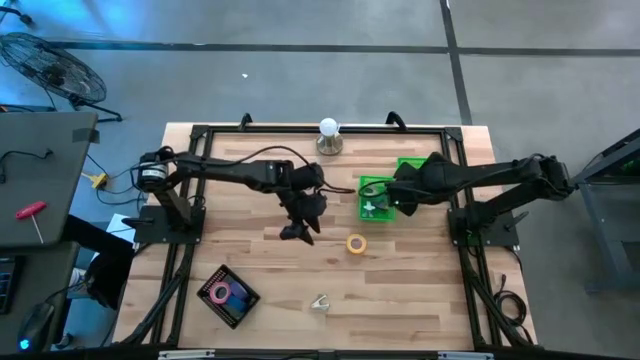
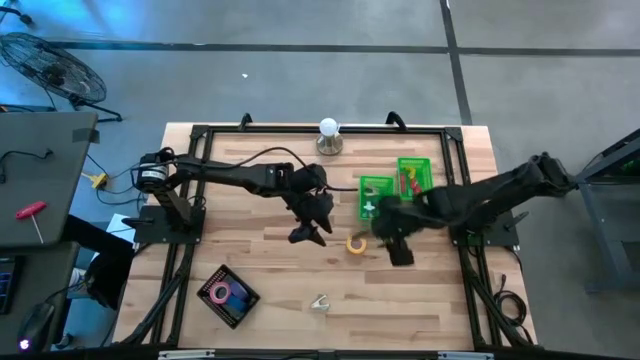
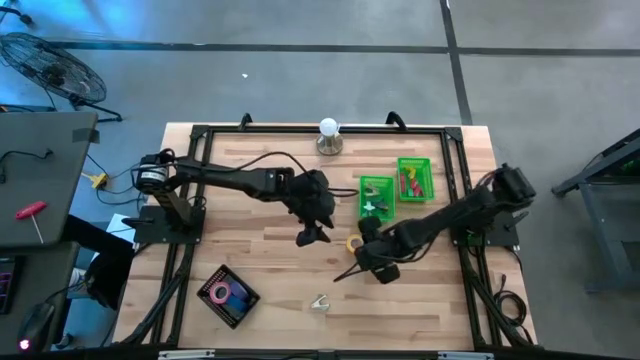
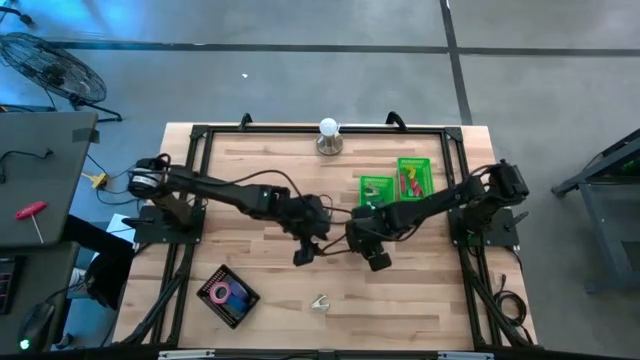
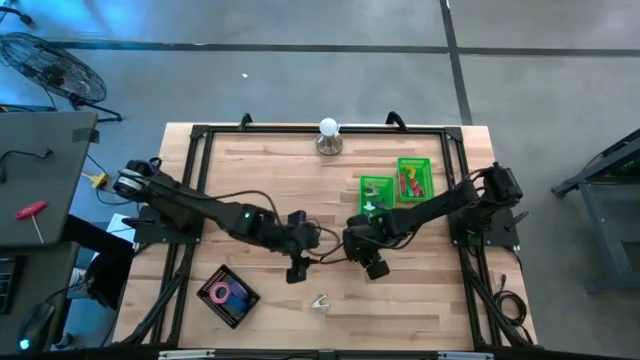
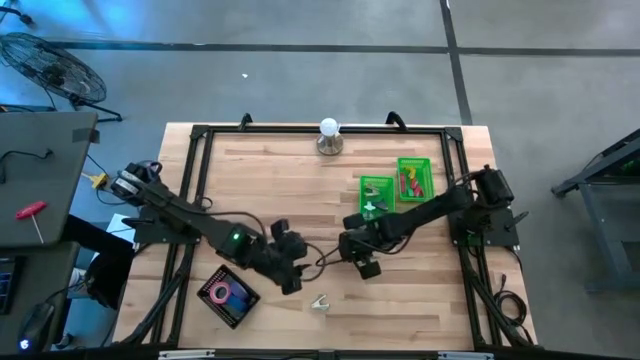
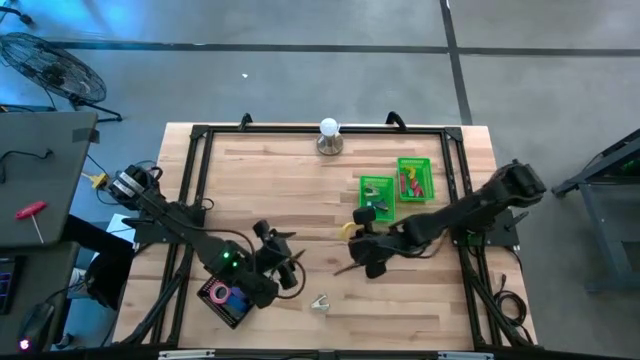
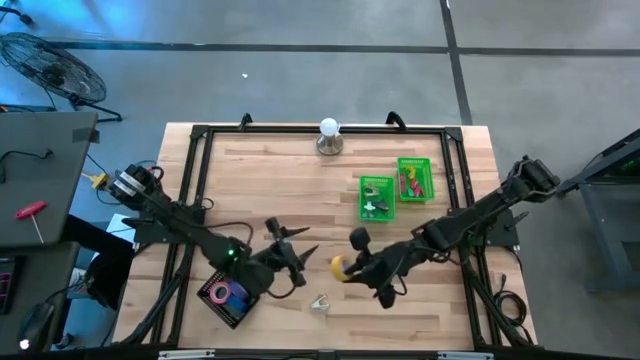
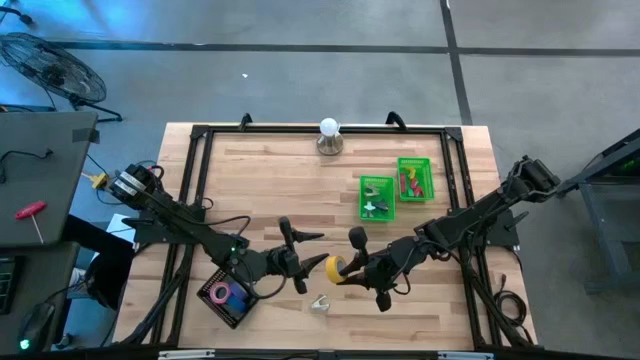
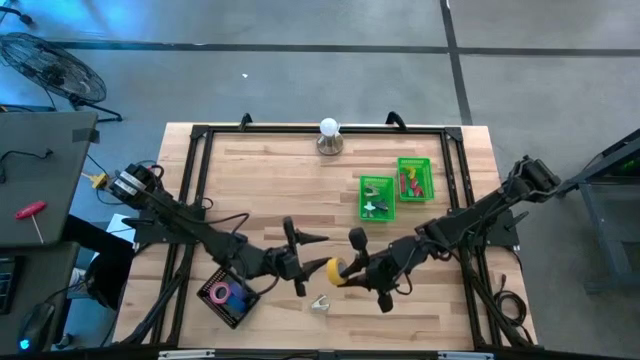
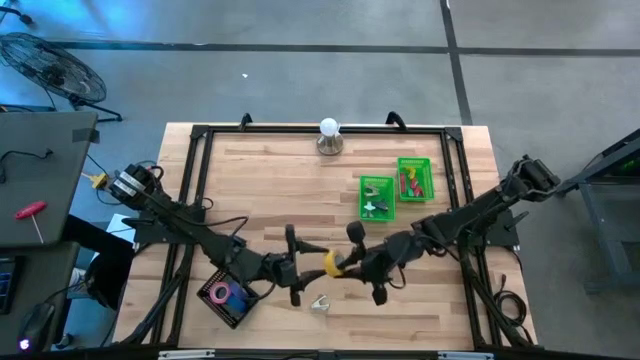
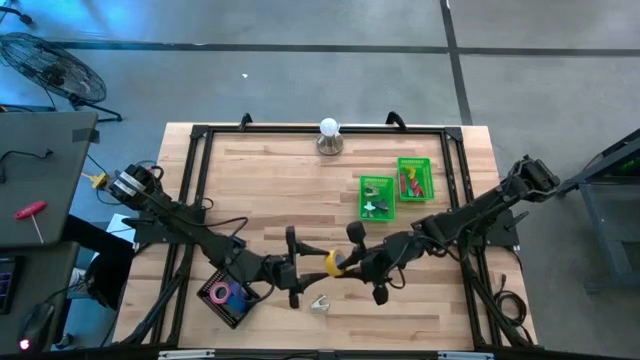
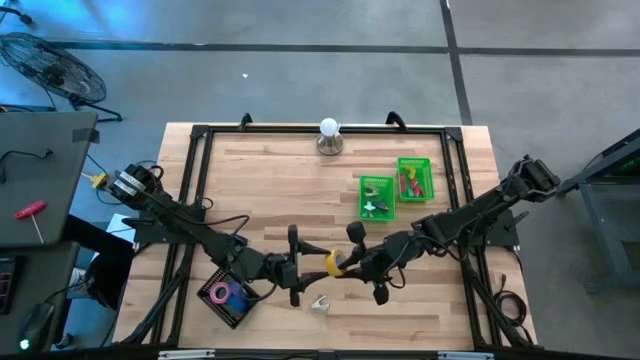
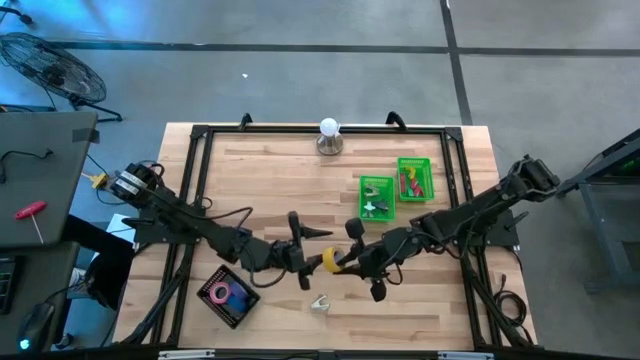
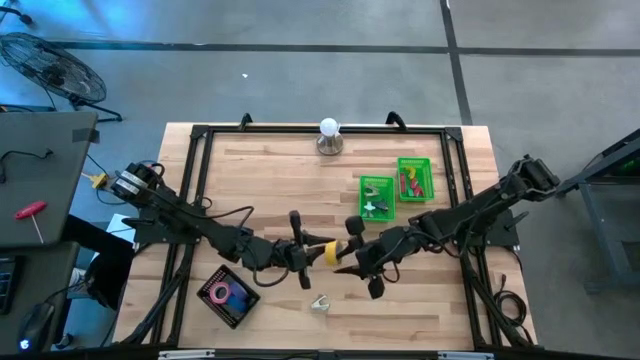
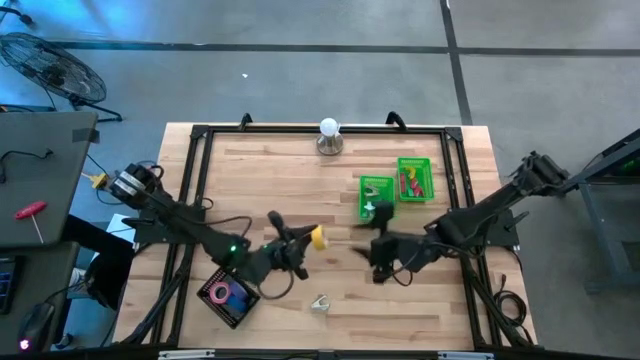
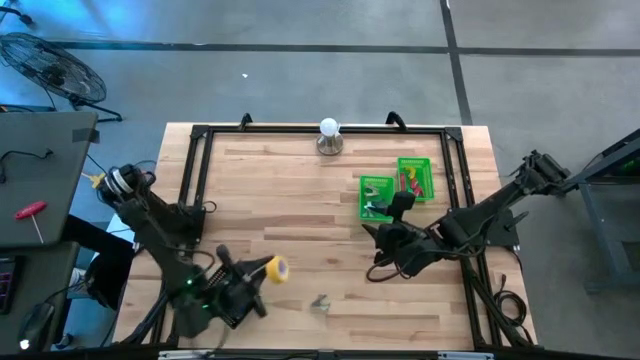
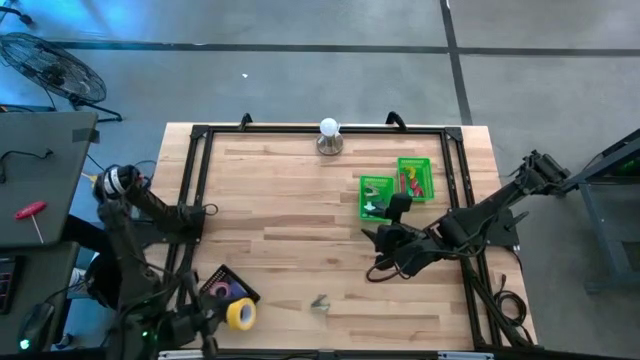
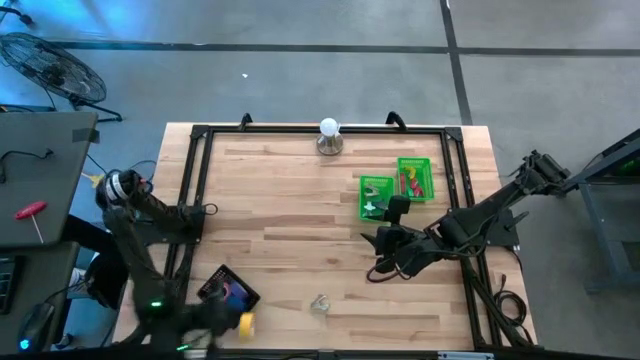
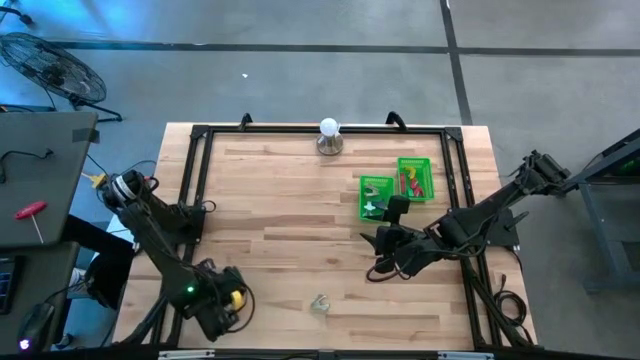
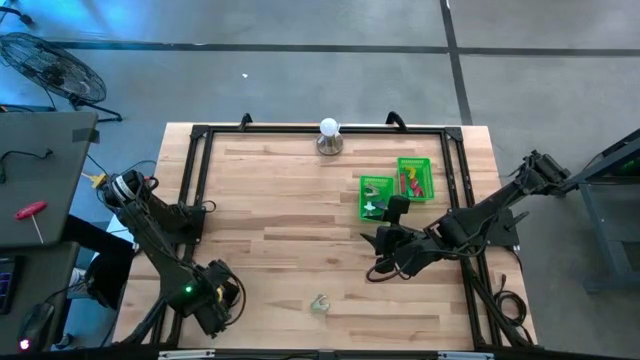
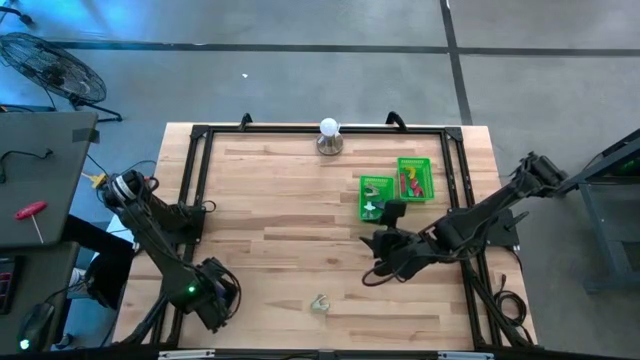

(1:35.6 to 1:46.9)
Task: Pick and place Stapler, Stapler remover, tape
Put the yellow tape into the black basket

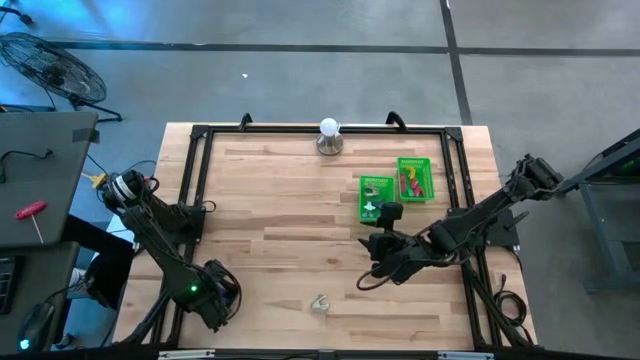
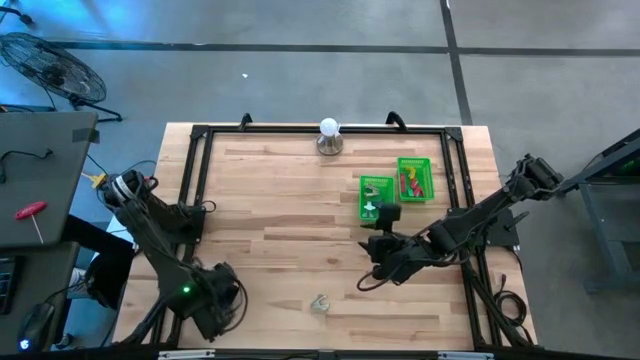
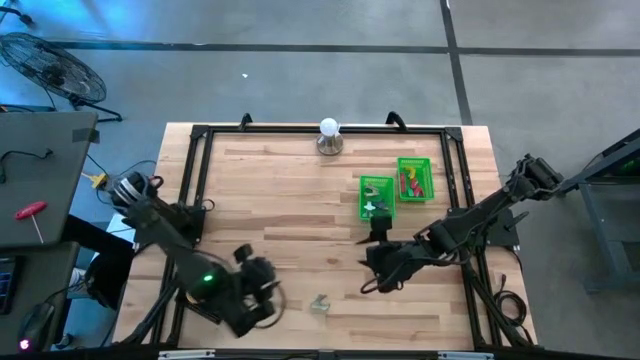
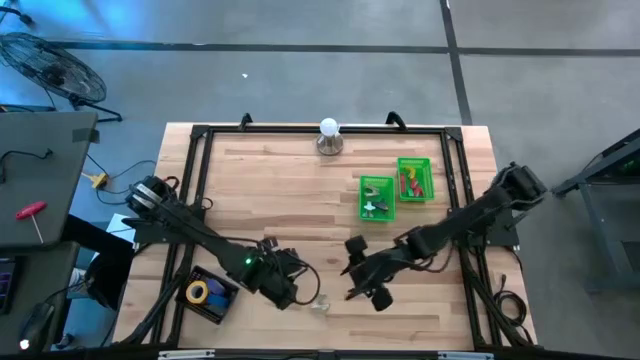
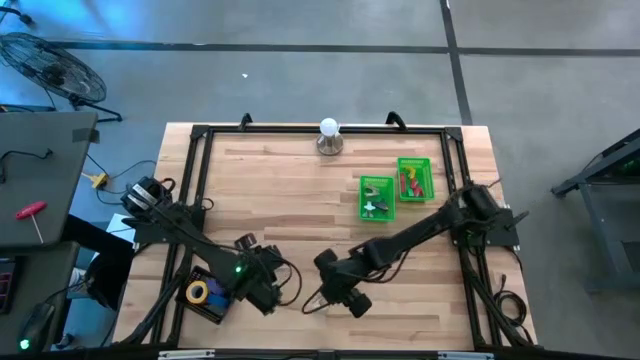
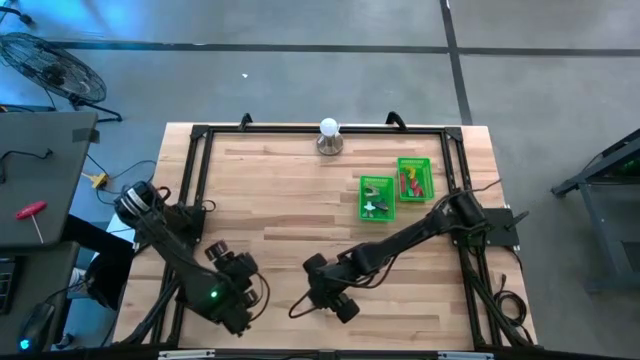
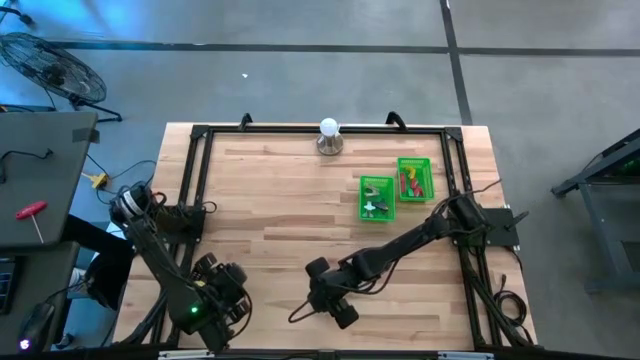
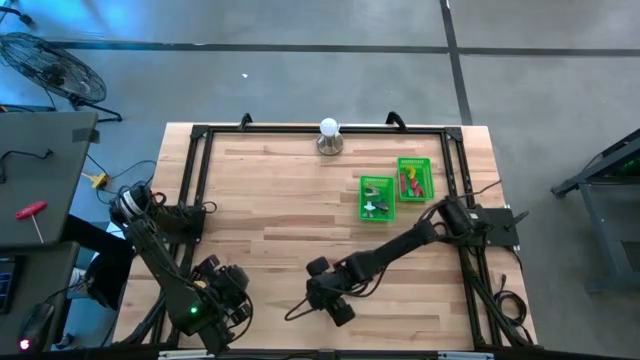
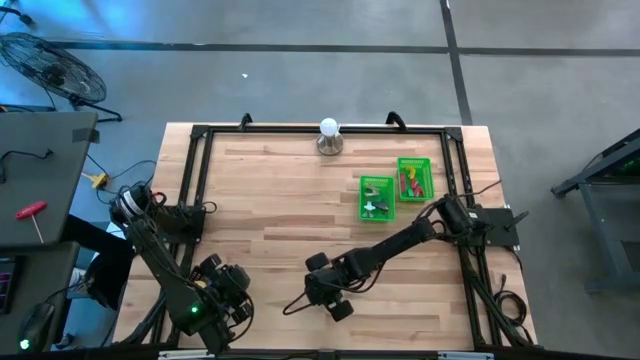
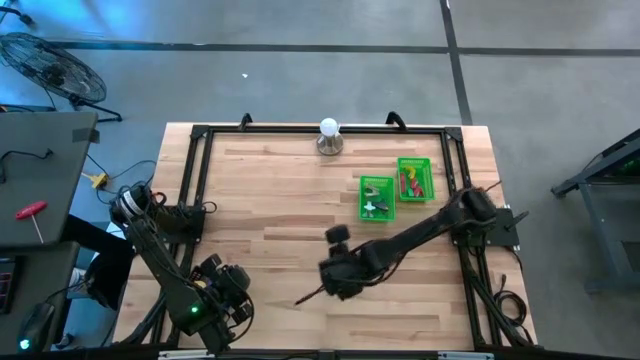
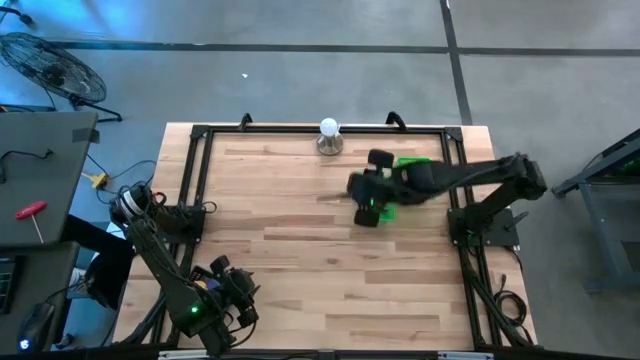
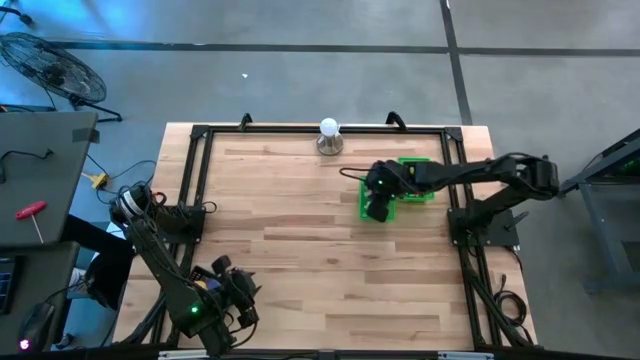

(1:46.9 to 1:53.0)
Put the white staple remover into the left green basket

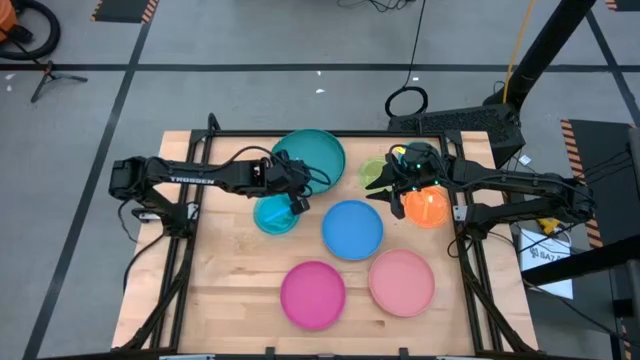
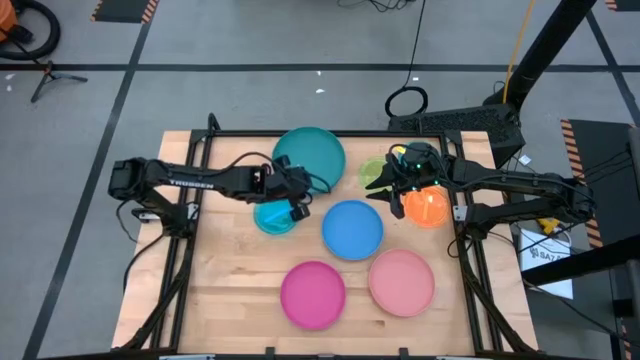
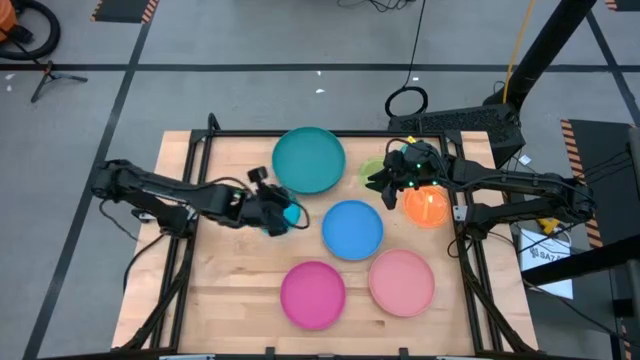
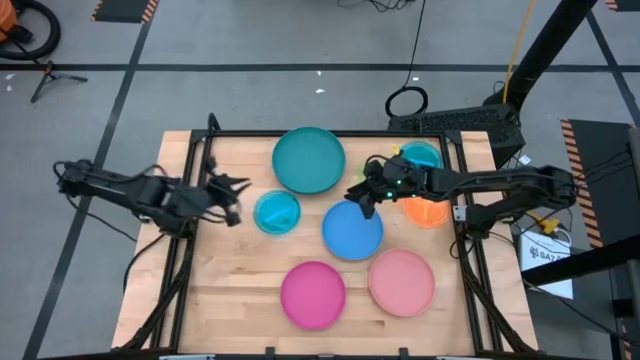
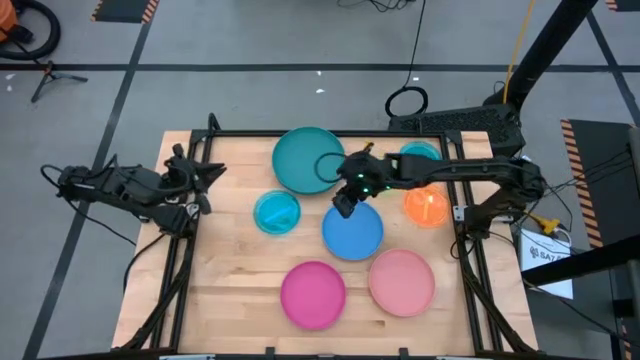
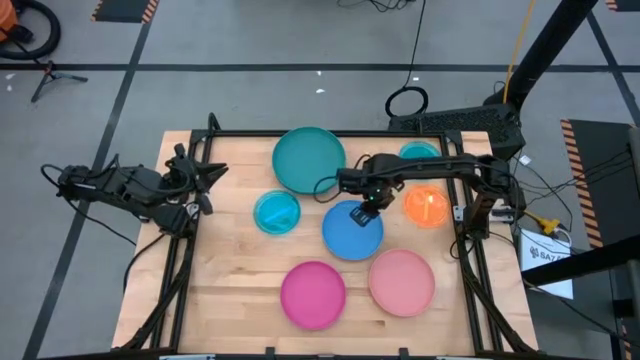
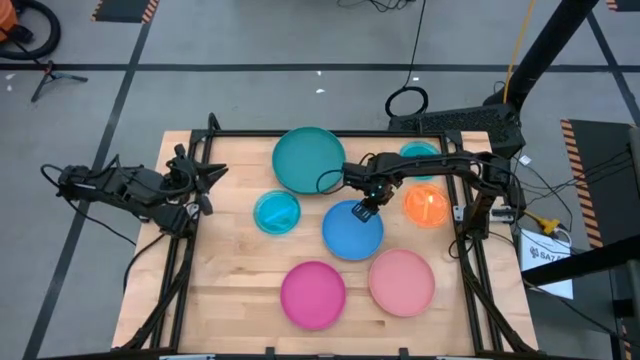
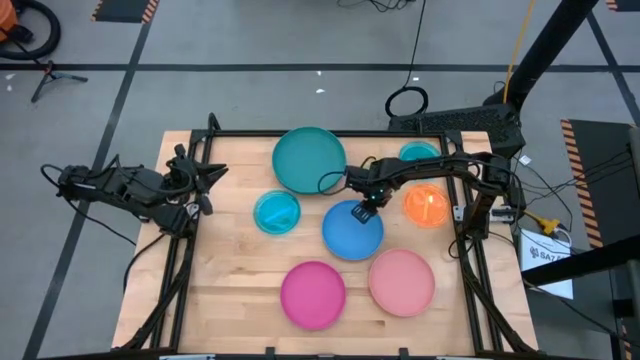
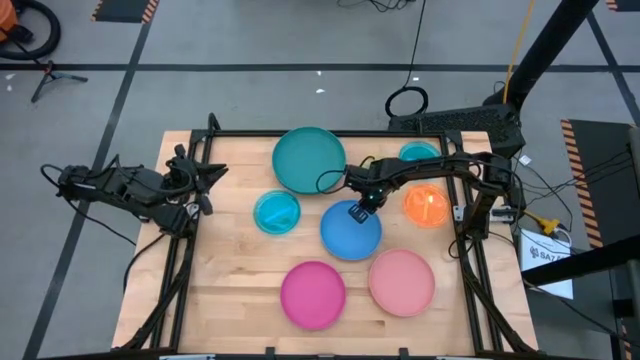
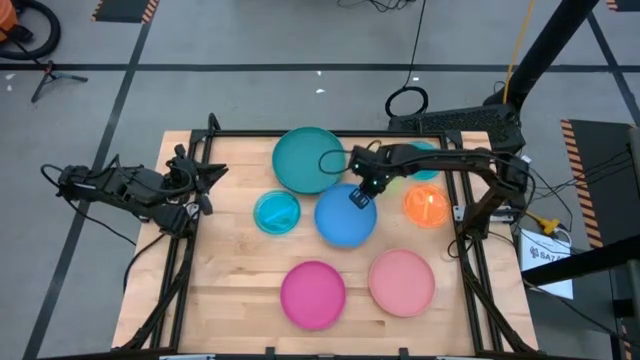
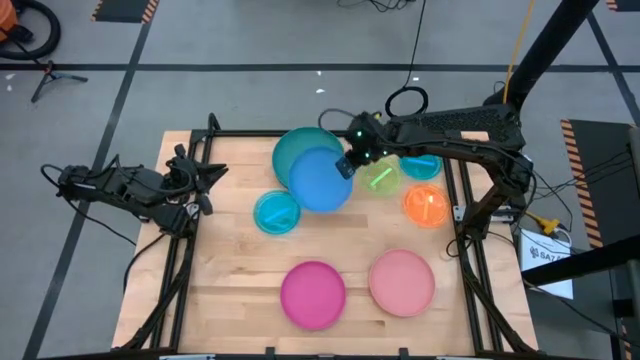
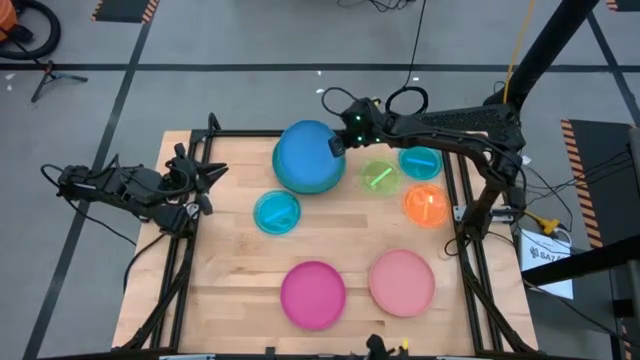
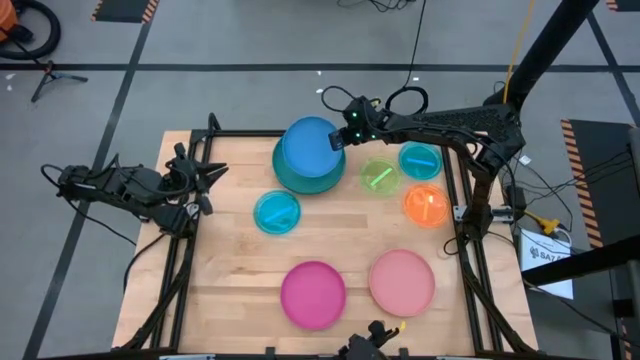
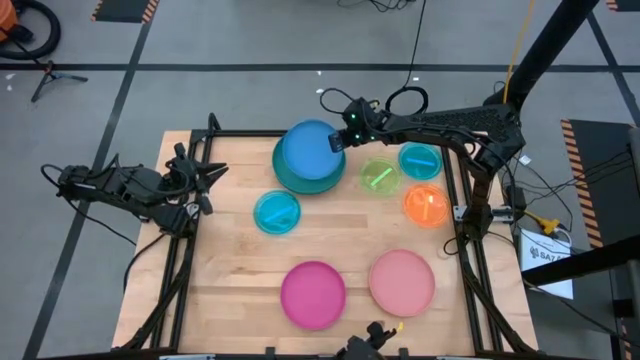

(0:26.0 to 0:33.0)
Task: Stack plastic plates
Stack the blue plate on top of the green plate
